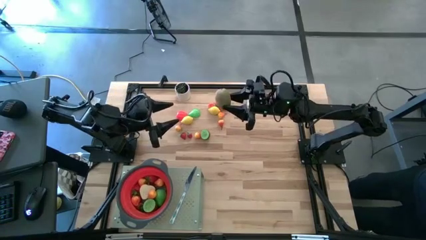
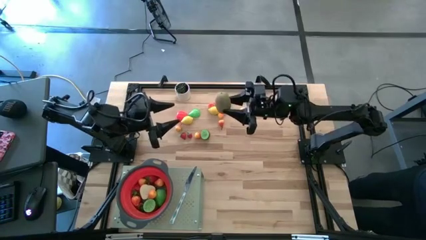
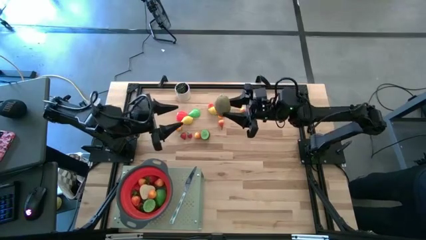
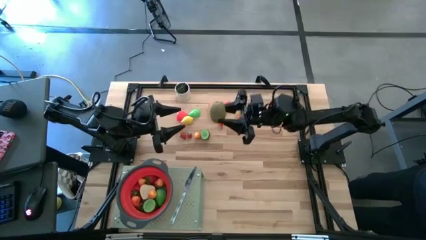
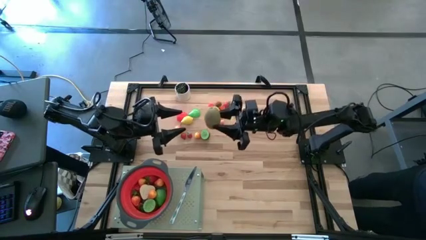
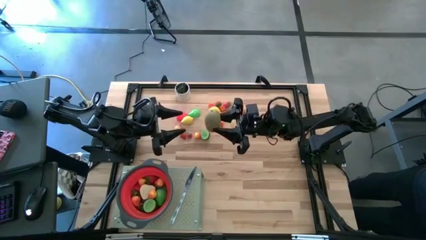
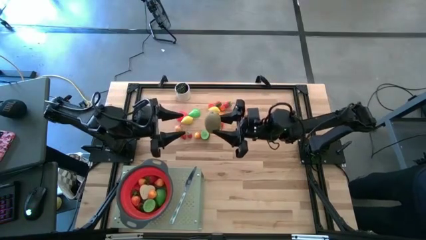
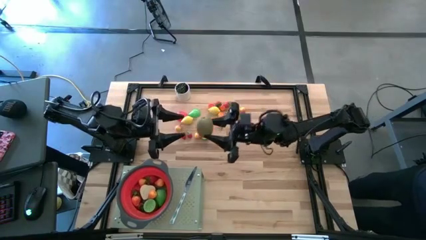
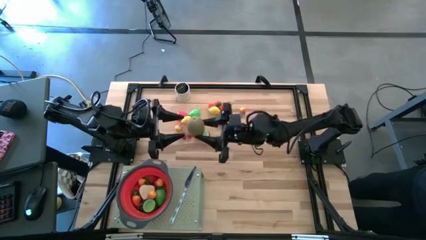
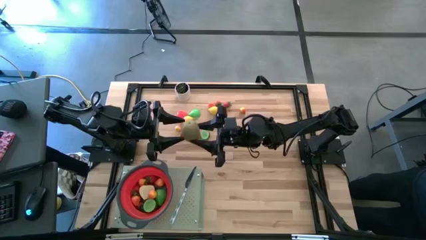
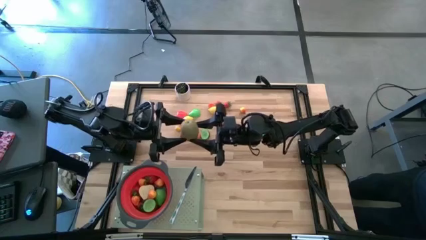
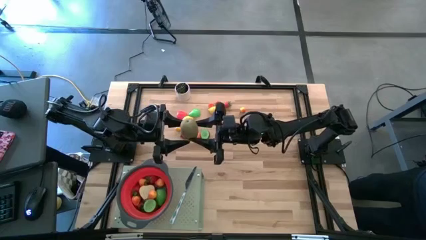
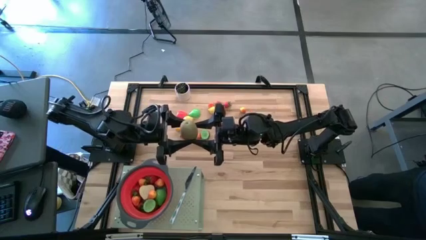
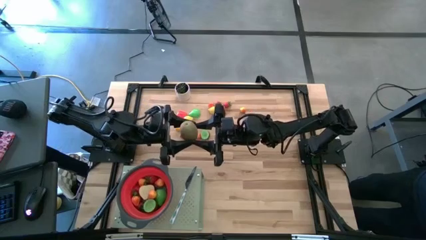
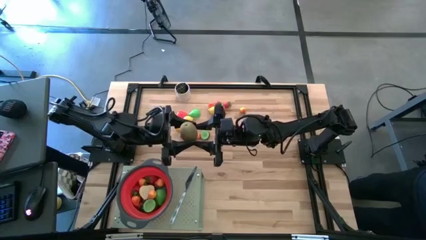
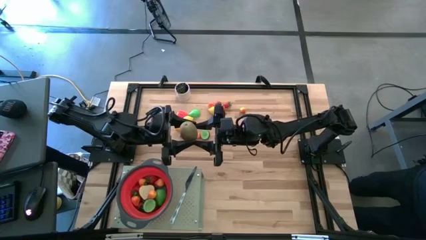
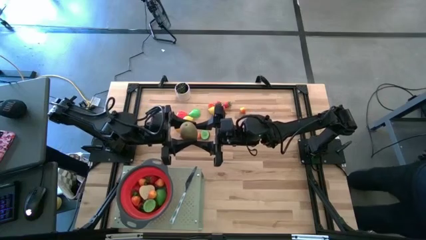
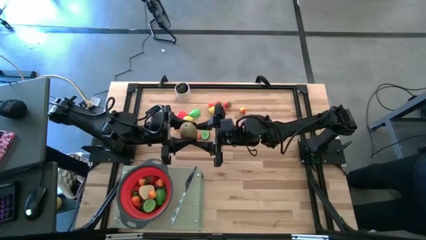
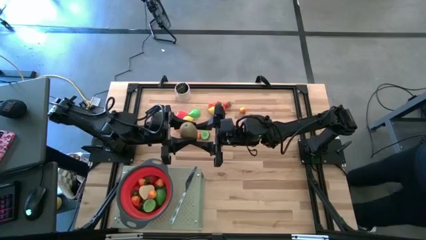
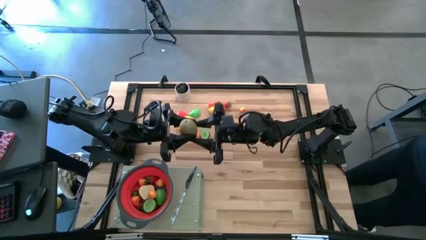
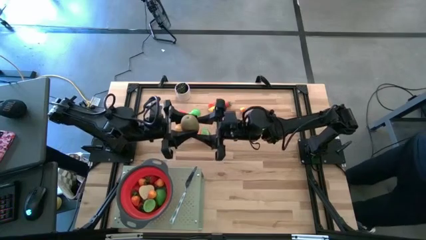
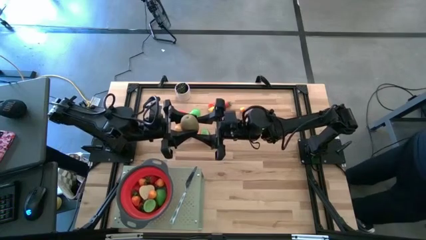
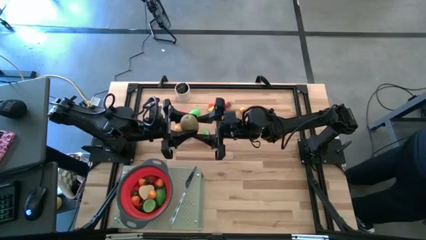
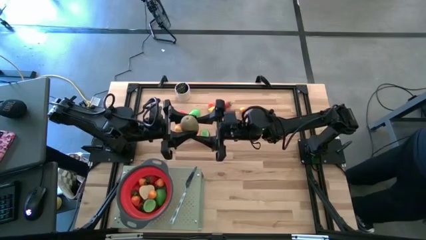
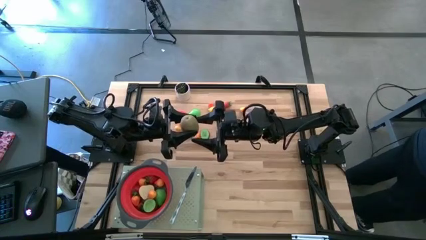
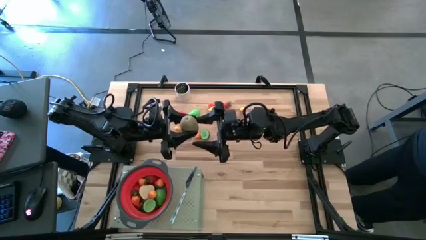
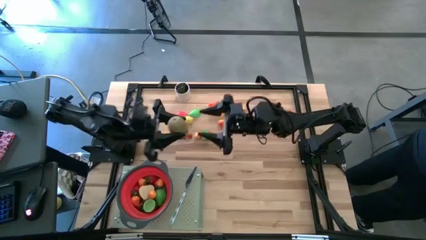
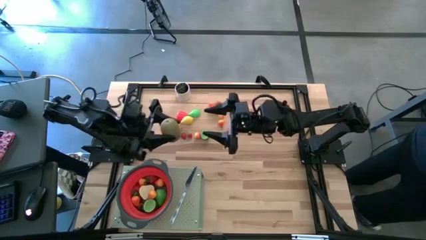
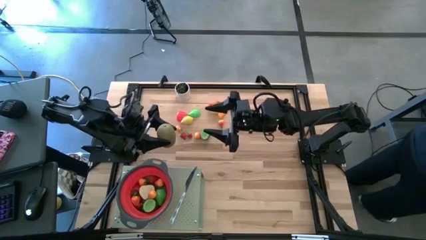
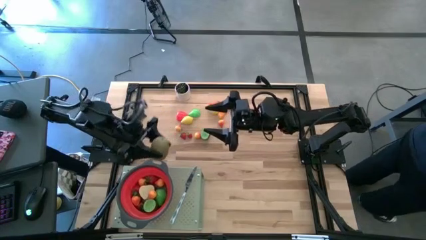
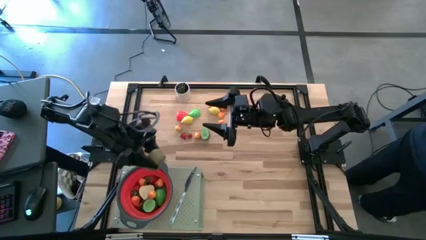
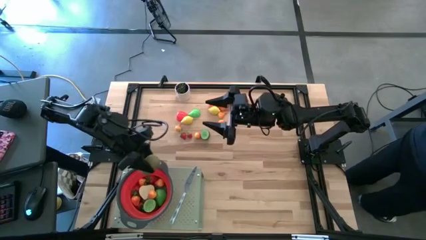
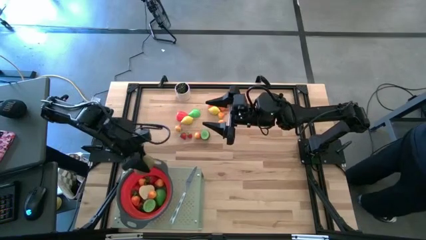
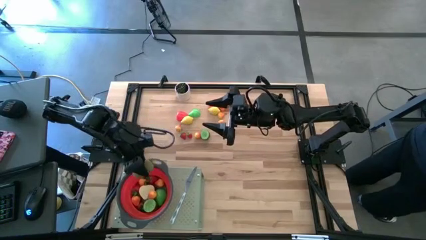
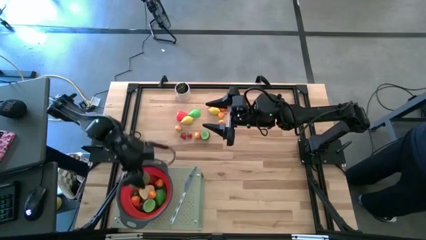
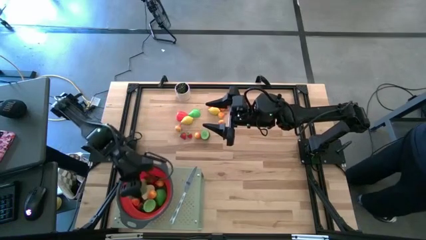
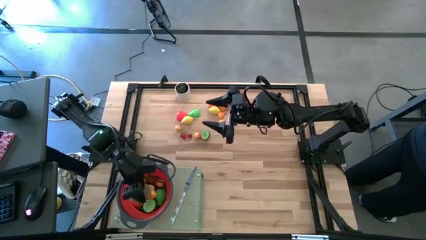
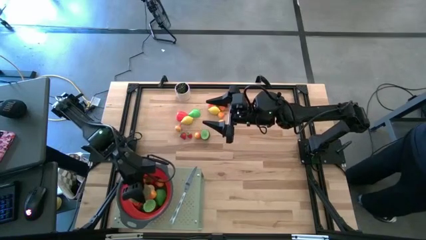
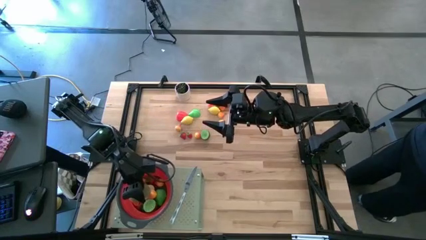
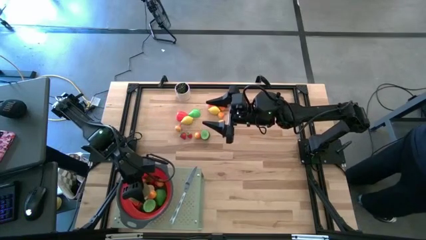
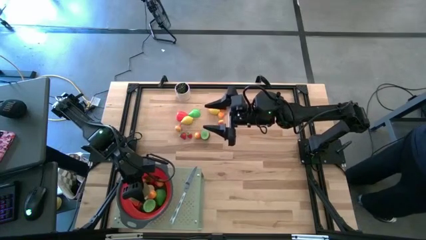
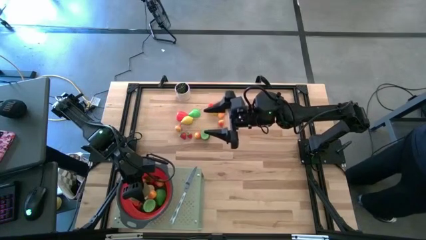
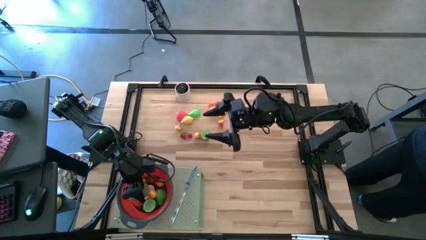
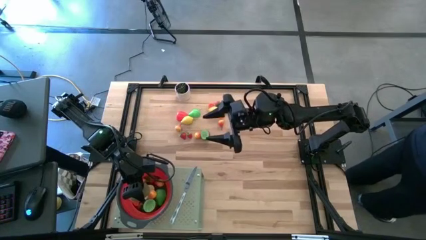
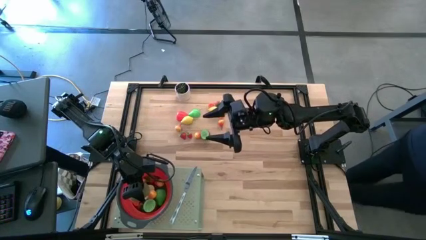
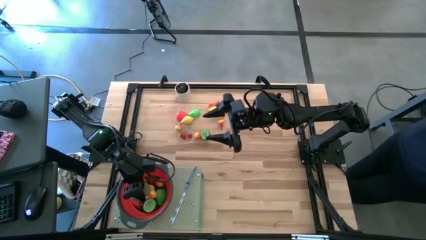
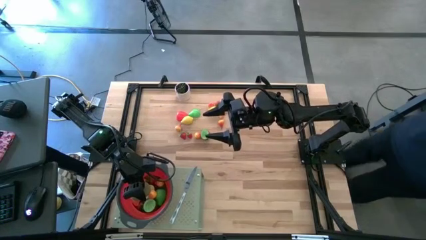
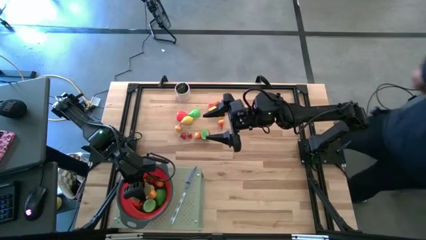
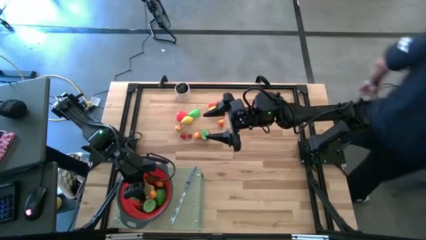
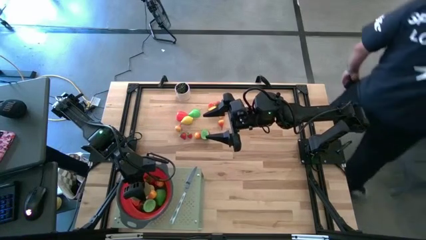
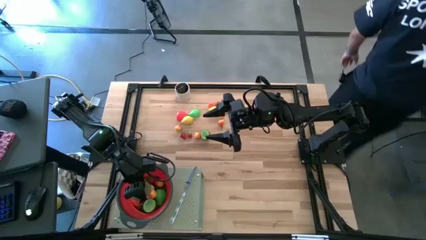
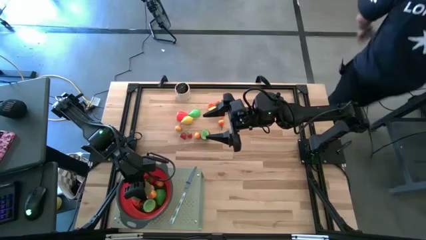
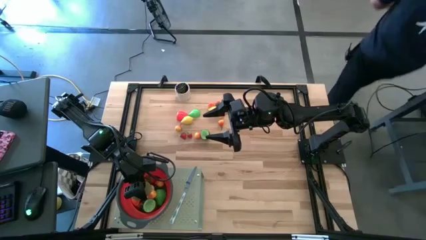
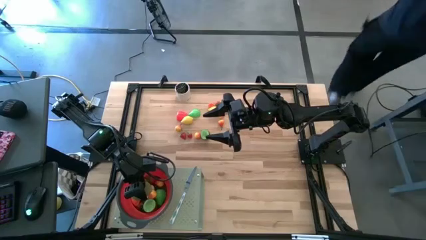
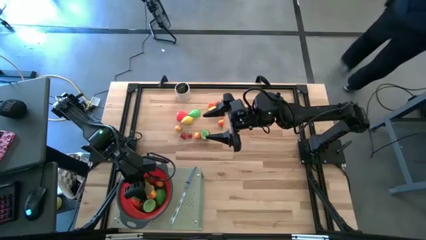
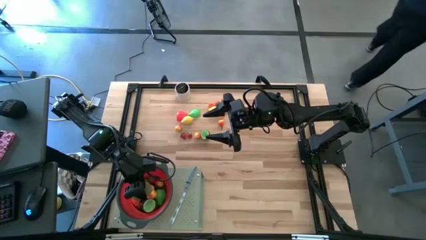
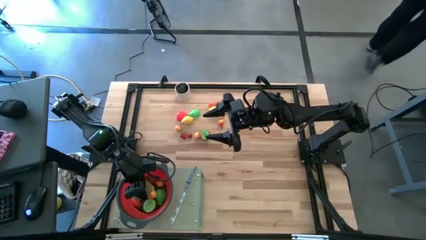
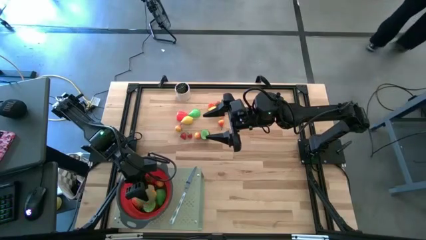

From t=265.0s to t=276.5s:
Task: Pick & Place Fruit
Put the kiwi into the red strainer bowl on the shelf

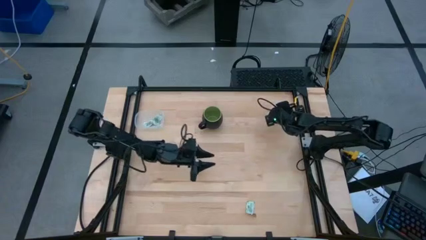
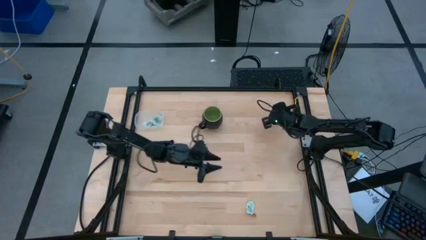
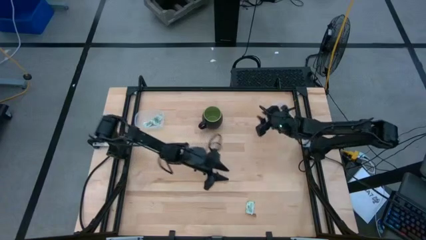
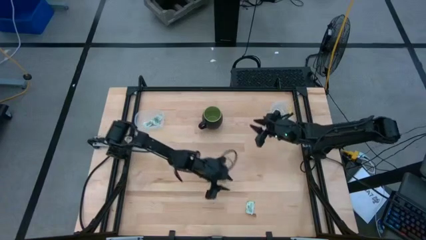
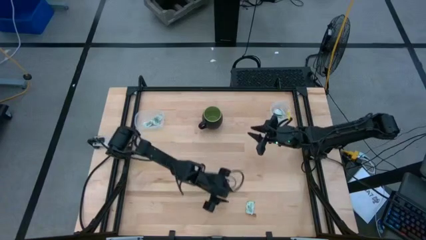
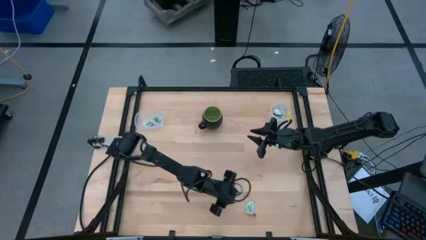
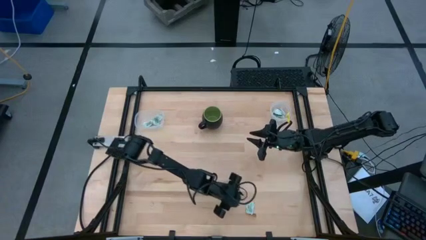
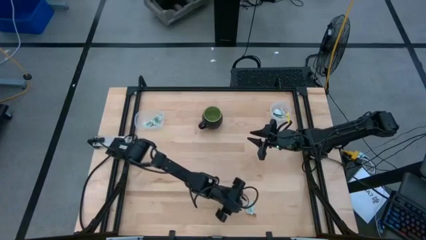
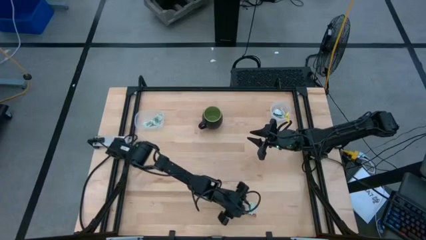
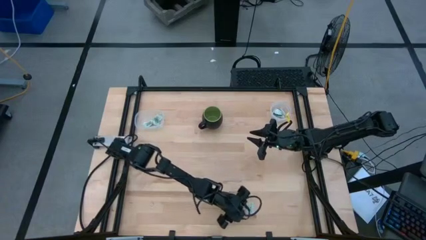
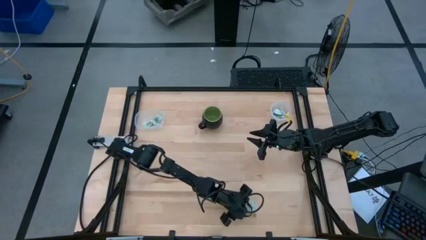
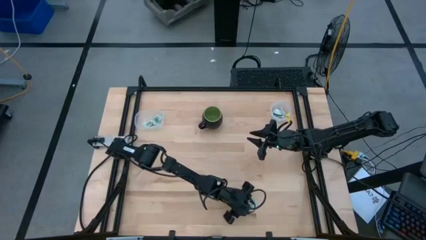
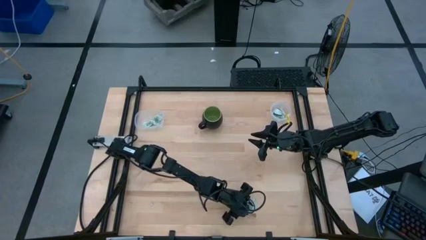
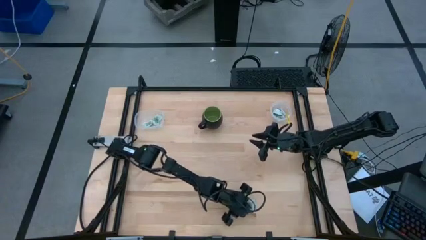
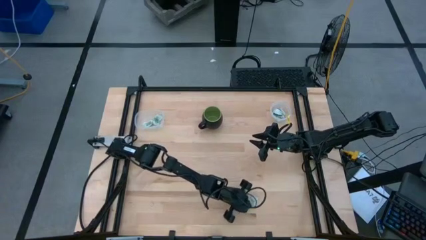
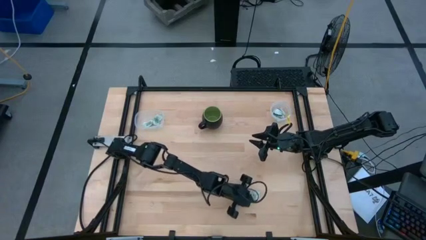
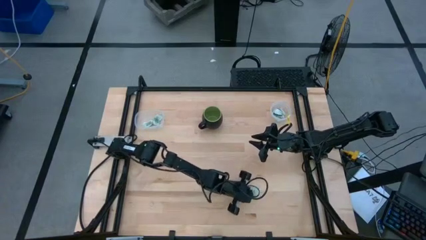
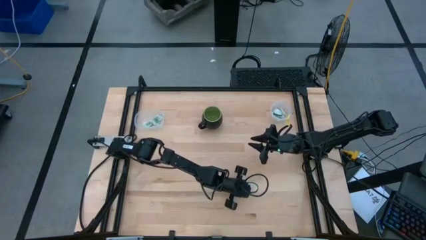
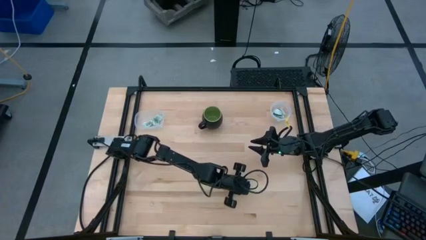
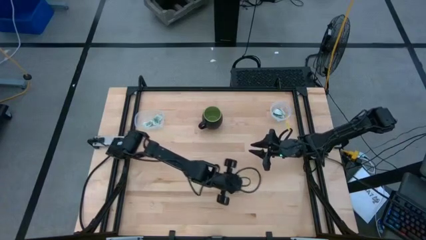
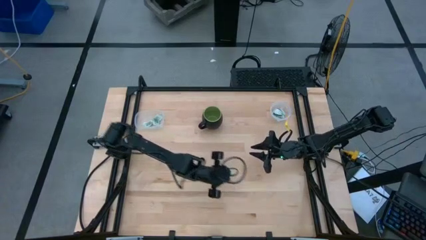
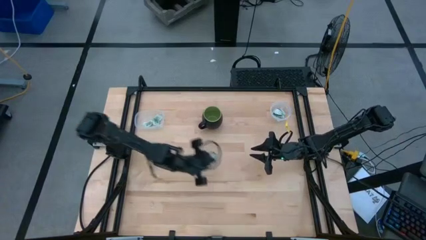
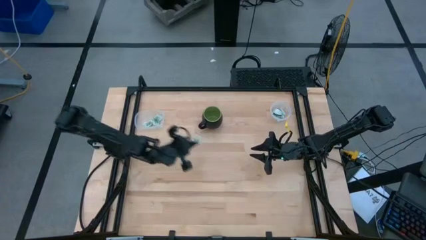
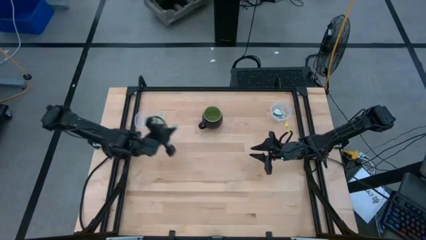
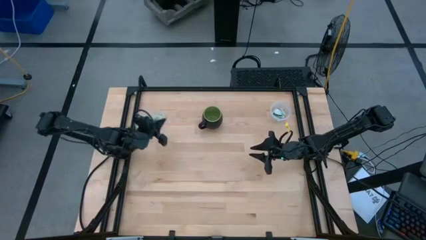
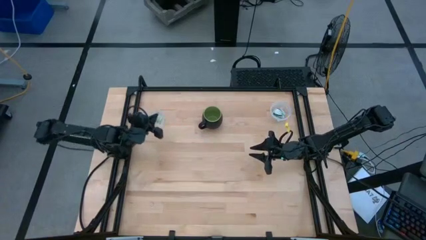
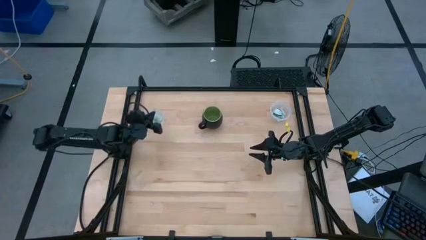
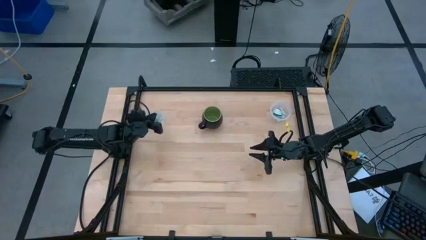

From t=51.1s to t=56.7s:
Task: Pick and place items into bin
Put the white stevia packet into the left transparent bin
